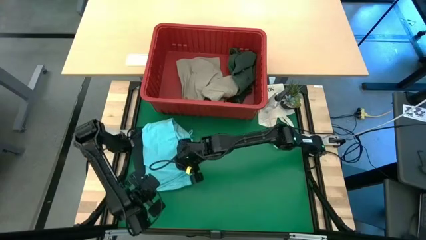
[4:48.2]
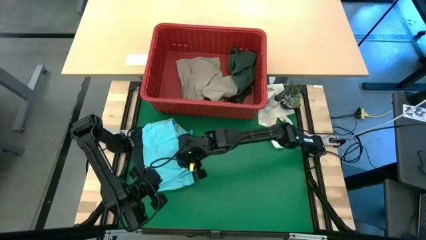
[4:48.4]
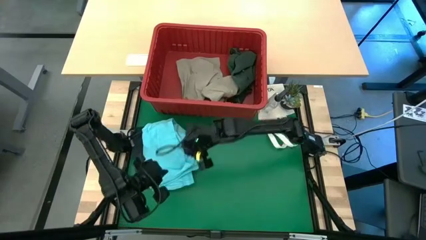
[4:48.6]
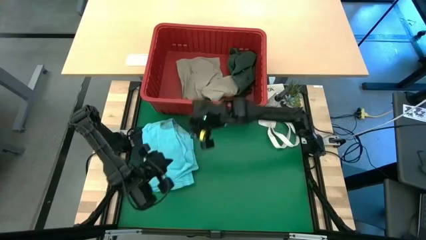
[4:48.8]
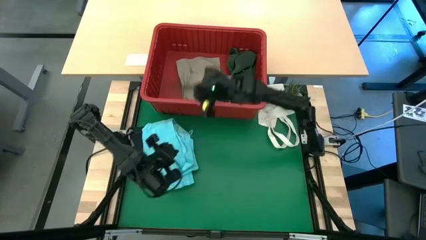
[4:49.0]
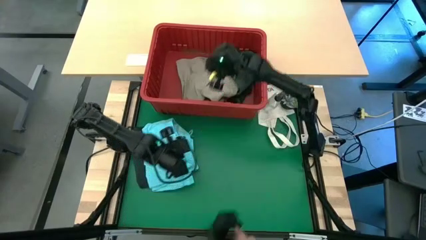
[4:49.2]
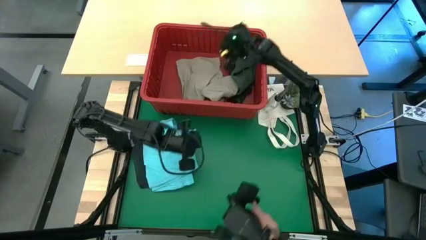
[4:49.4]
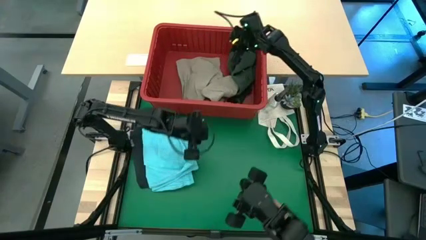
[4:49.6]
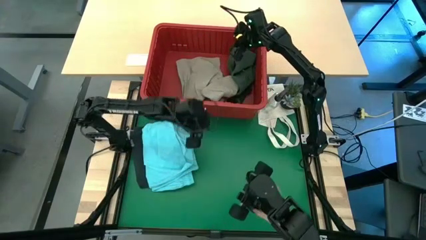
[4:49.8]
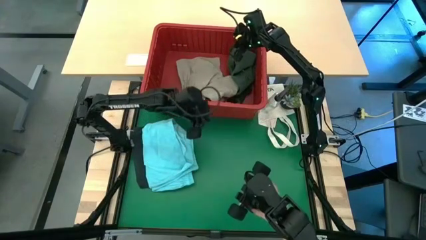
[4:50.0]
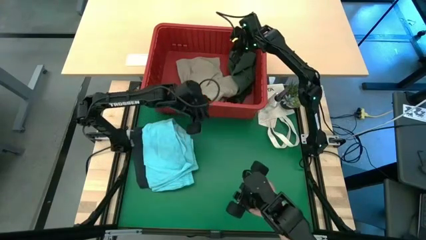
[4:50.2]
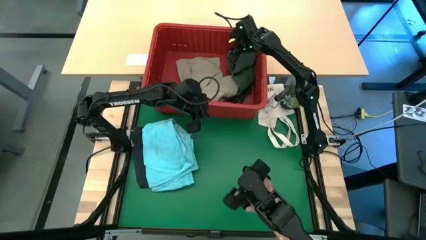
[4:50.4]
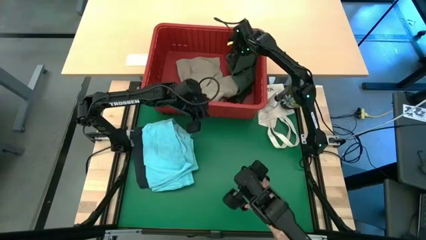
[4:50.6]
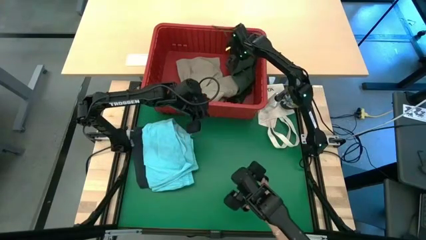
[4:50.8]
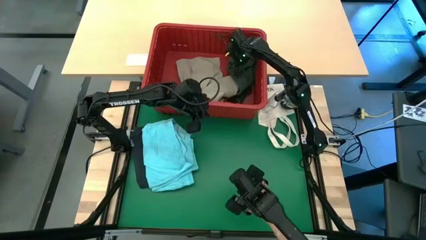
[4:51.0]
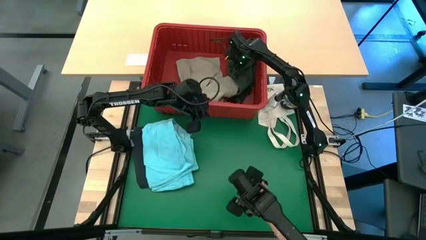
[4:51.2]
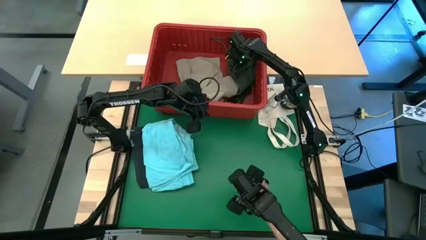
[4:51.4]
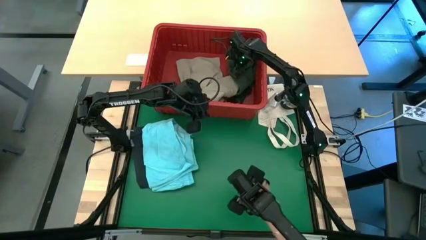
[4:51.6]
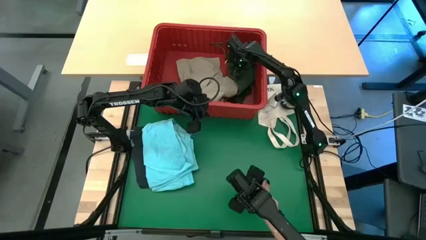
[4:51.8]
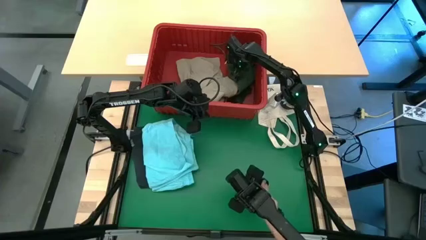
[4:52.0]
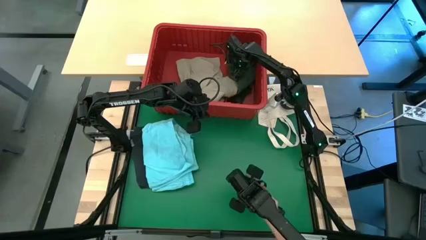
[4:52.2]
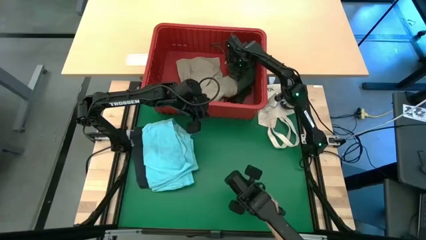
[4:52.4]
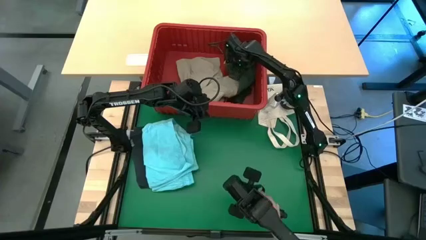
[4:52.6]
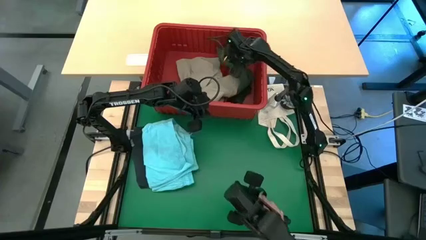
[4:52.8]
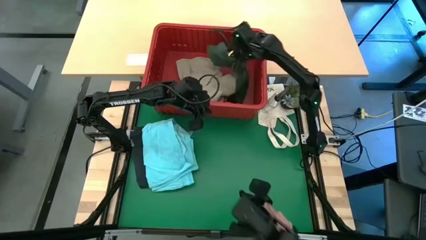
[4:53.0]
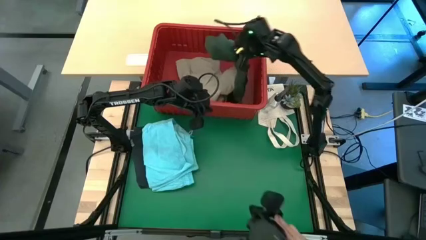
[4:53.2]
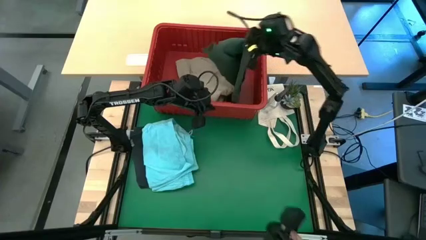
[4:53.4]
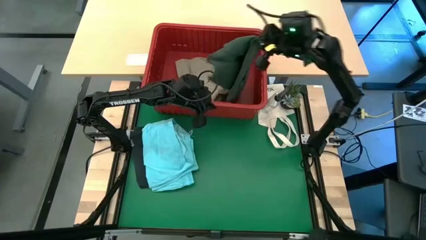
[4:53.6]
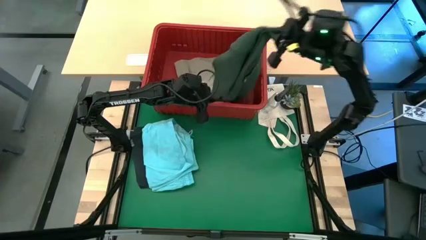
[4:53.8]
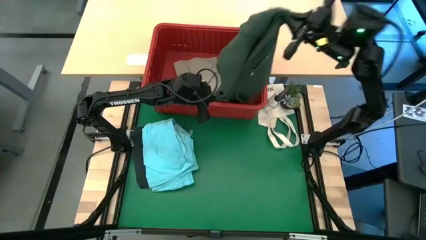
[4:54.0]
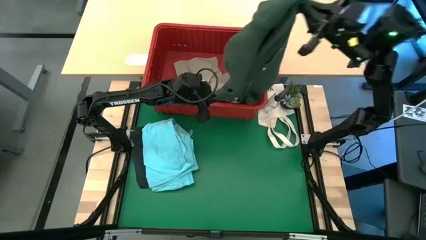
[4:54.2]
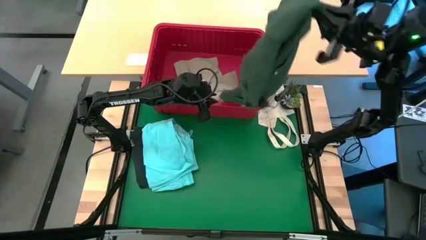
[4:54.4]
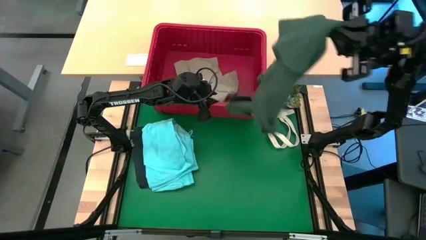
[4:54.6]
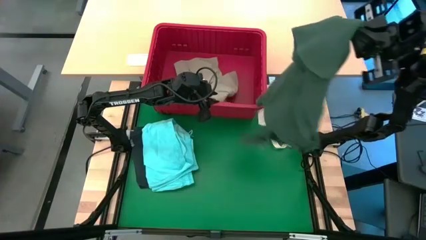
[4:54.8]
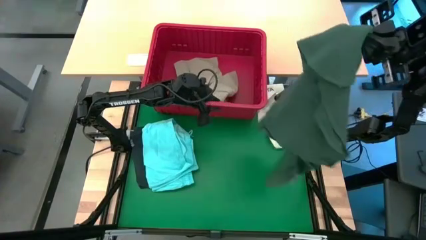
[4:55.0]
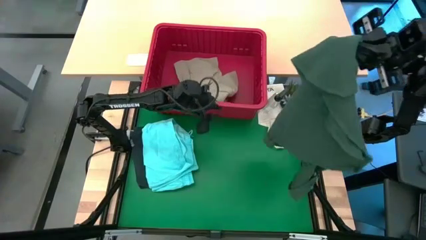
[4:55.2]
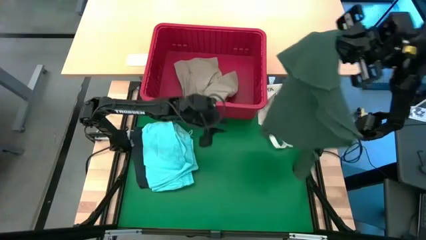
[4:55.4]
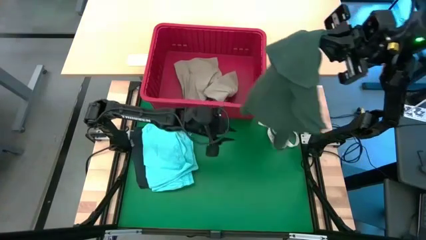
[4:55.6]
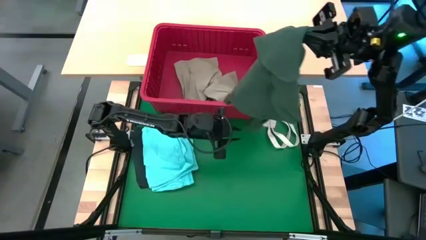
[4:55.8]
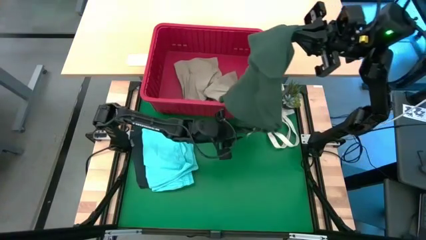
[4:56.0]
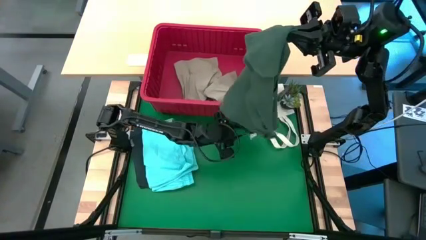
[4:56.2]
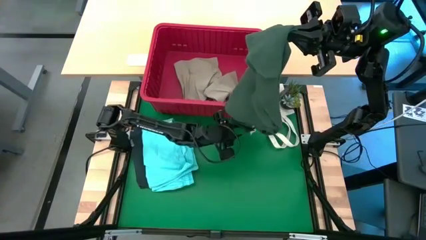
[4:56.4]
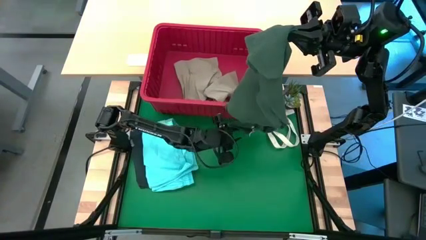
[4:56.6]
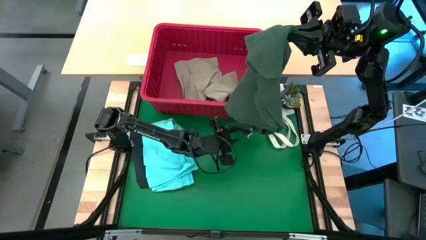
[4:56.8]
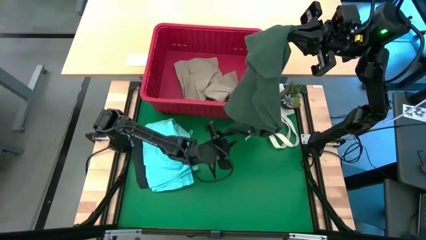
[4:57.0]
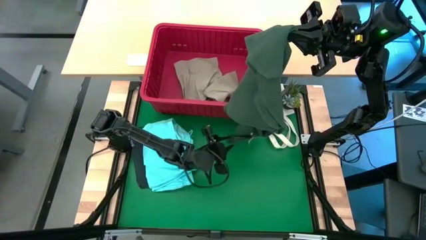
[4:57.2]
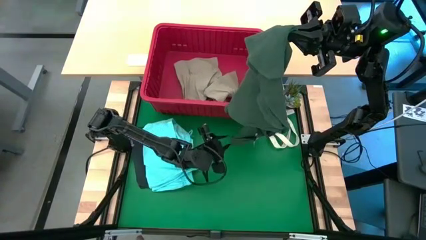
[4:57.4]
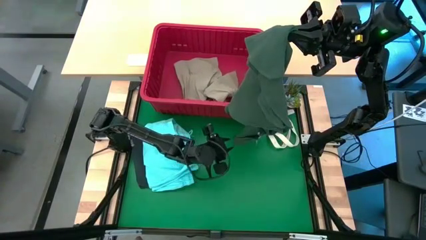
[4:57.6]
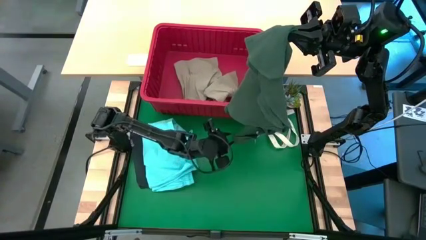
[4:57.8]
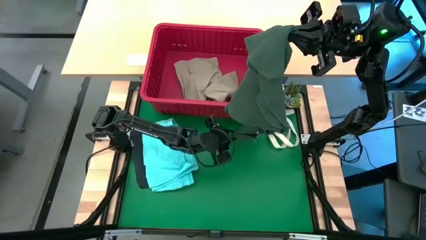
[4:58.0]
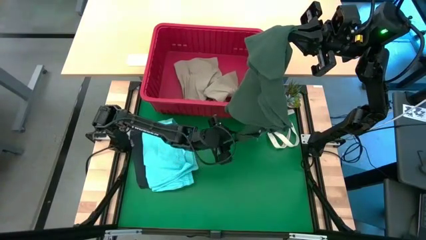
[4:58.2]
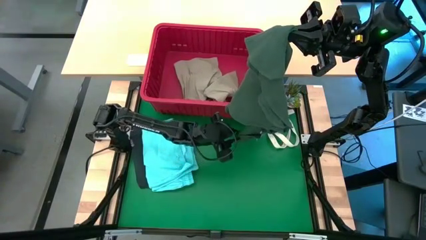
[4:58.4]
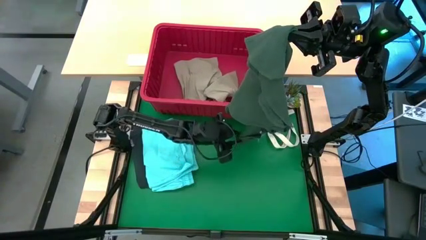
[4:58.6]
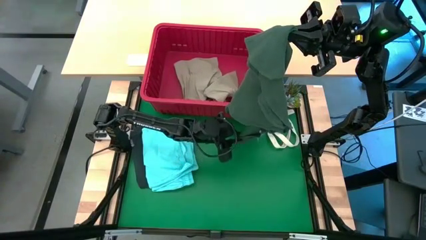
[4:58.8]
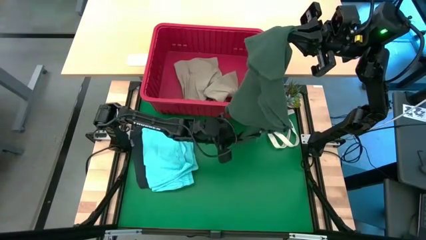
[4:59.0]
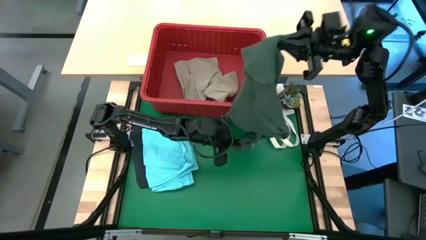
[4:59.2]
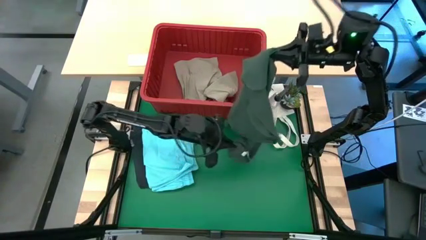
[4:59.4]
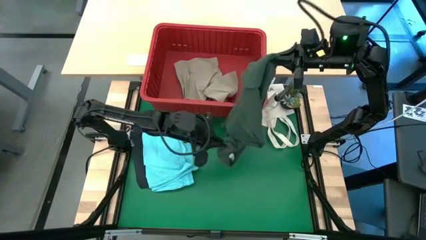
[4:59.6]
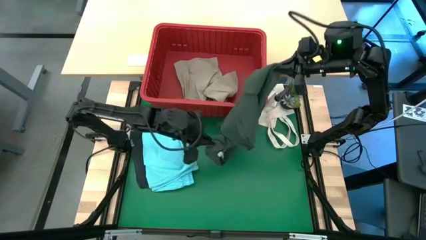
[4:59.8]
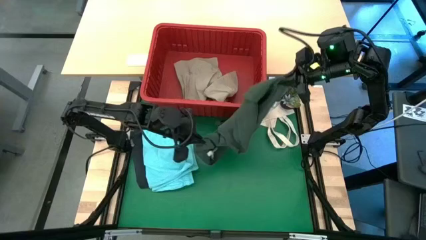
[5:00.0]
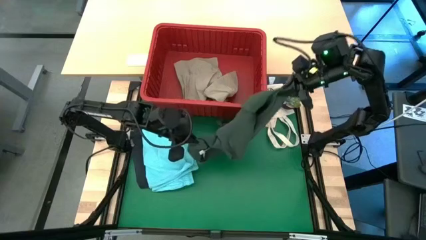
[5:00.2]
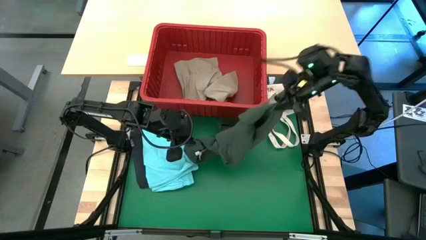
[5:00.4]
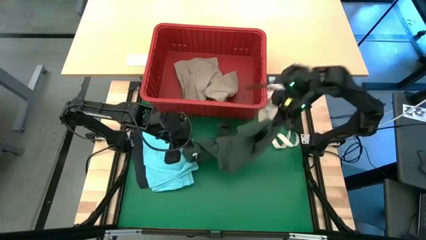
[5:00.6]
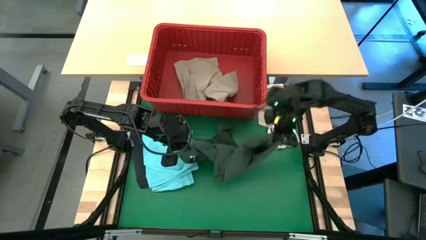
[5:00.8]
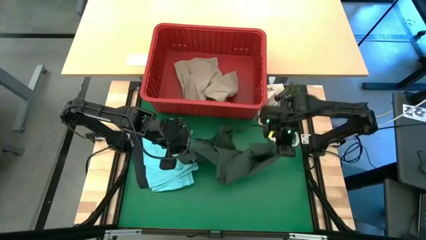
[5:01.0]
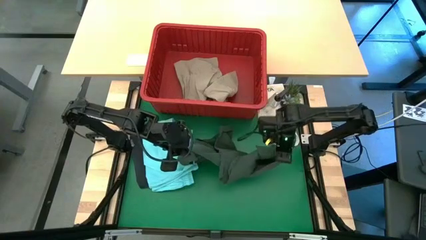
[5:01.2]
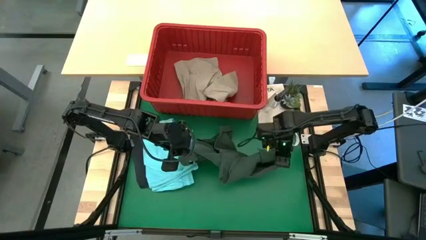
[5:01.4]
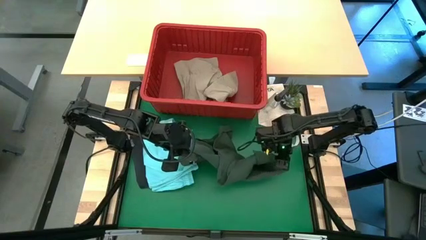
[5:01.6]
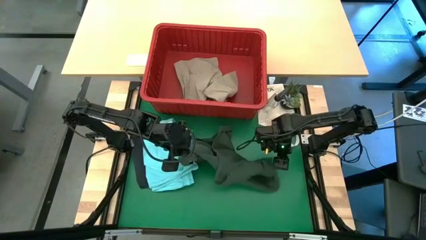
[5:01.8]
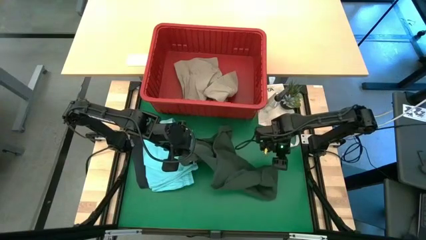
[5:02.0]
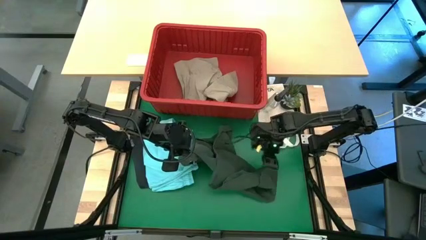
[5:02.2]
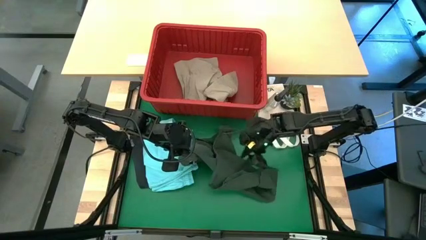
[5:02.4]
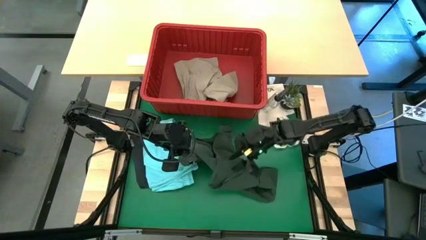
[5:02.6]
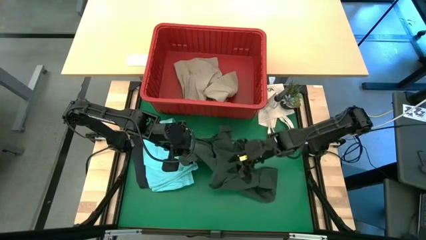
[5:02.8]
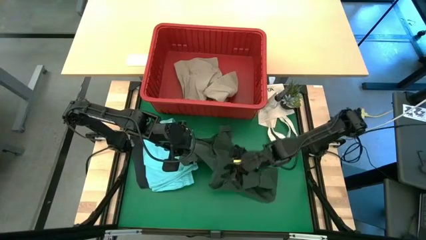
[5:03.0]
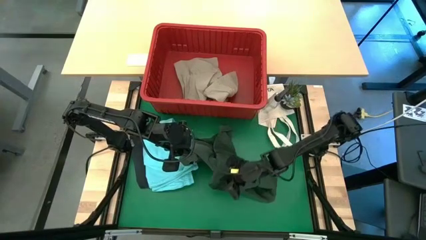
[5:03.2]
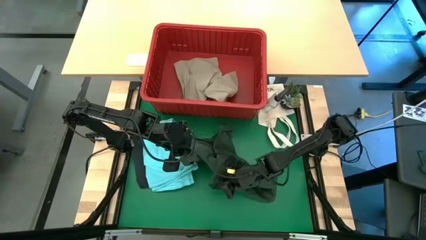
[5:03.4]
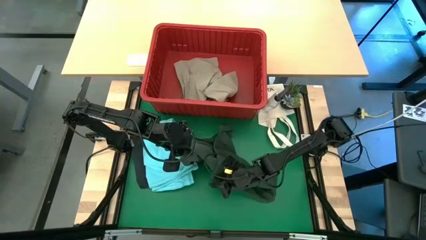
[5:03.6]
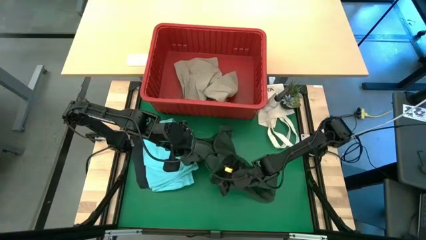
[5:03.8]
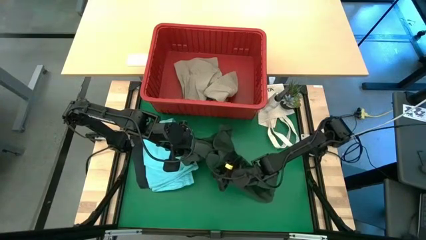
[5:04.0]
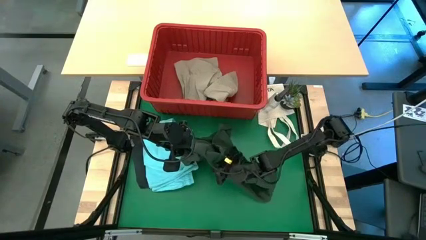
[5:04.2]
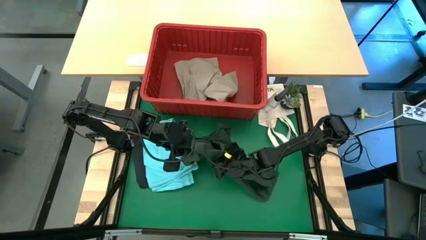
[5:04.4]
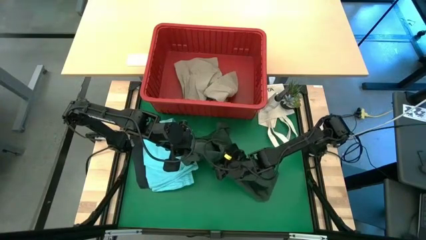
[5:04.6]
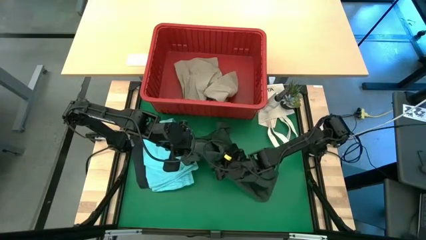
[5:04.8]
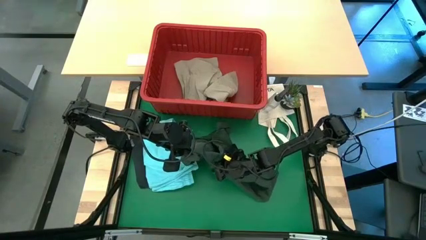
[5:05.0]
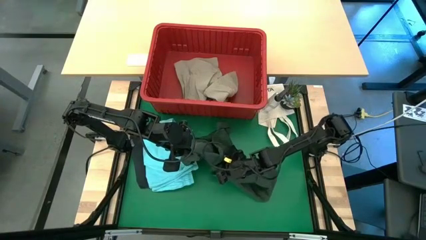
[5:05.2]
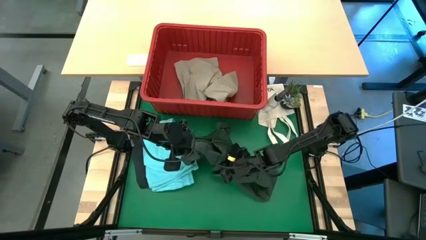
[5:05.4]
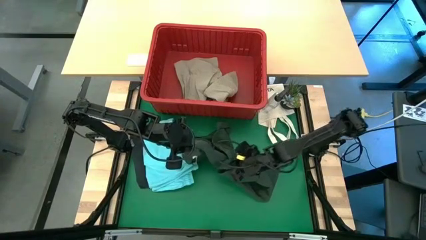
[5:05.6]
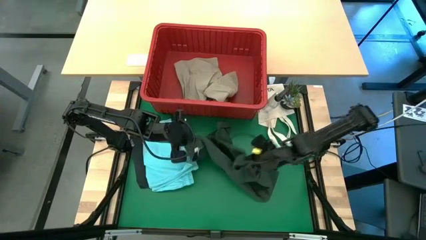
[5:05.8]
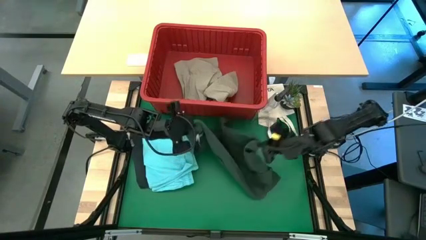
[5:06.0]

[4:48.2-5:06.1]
Task: Fold Laundry from Bin
Fold the green polo shirt from the red laundry bin
